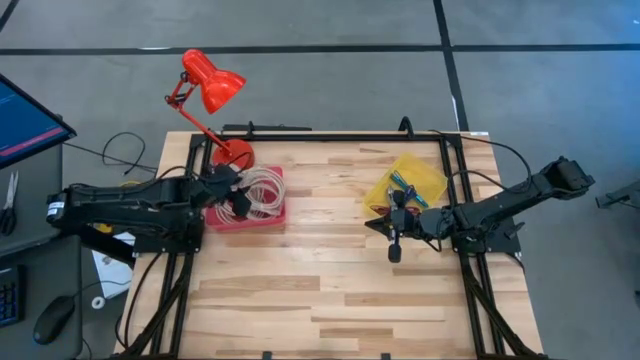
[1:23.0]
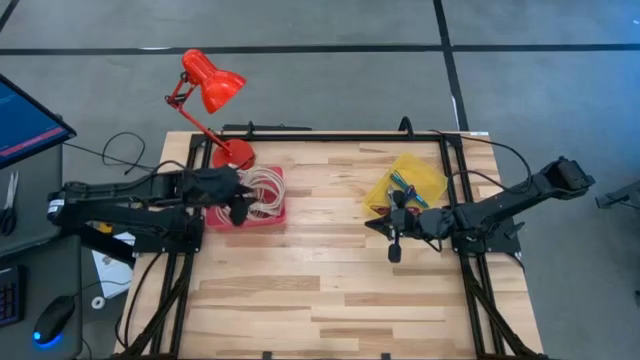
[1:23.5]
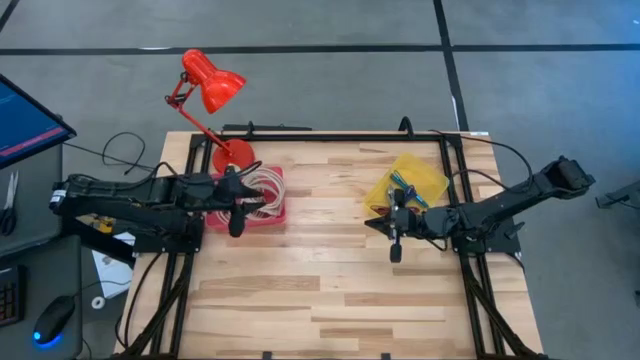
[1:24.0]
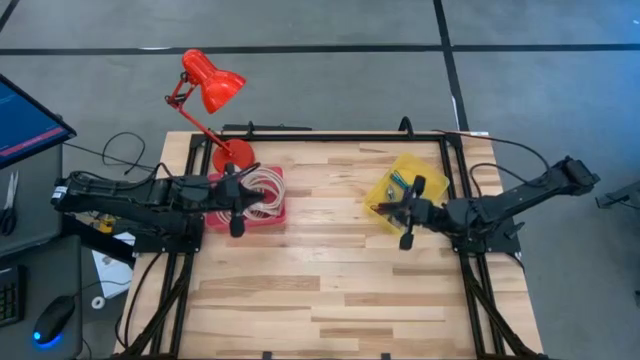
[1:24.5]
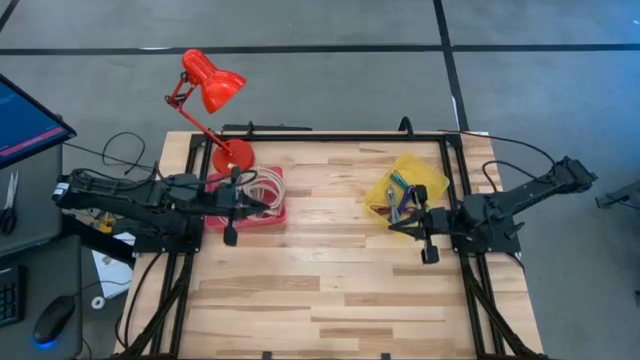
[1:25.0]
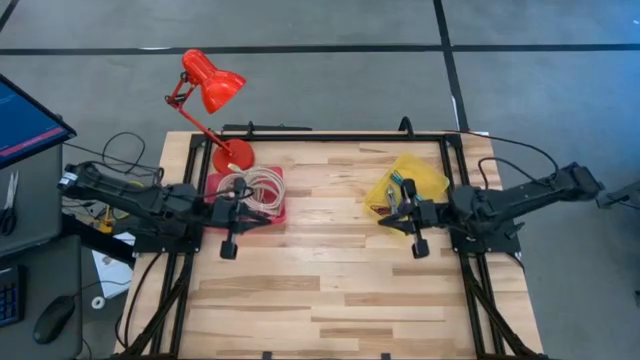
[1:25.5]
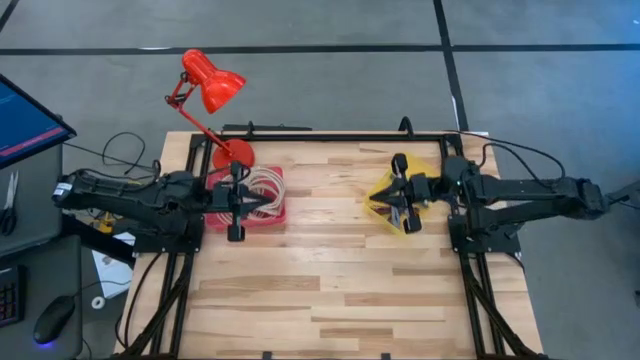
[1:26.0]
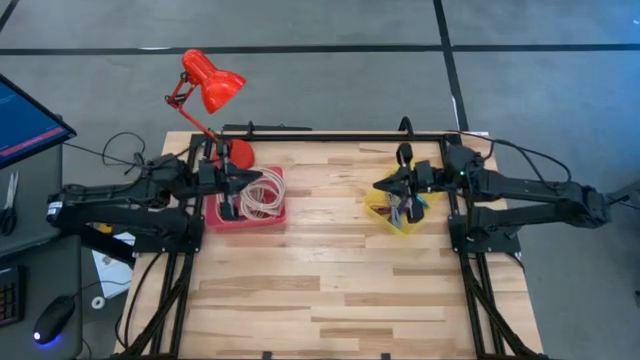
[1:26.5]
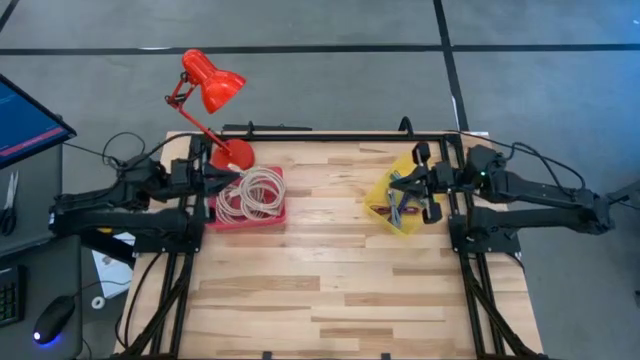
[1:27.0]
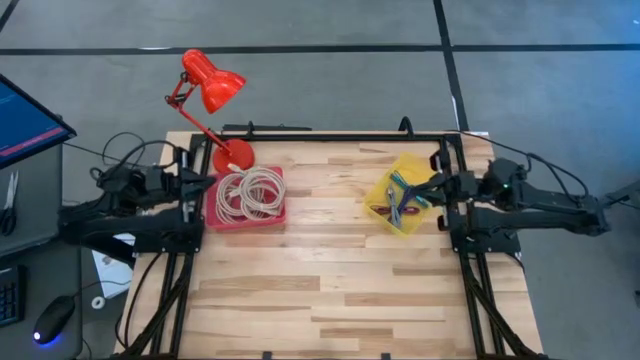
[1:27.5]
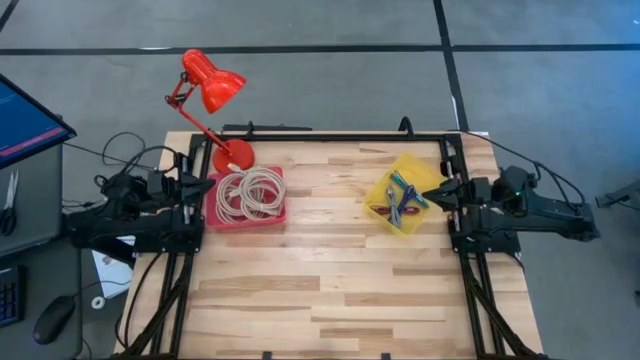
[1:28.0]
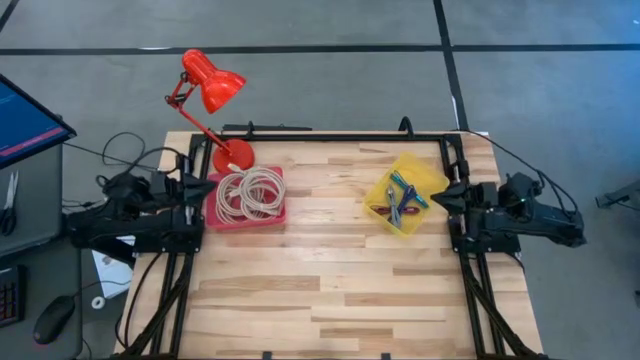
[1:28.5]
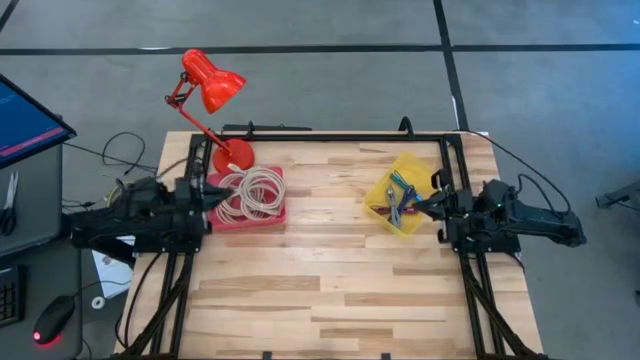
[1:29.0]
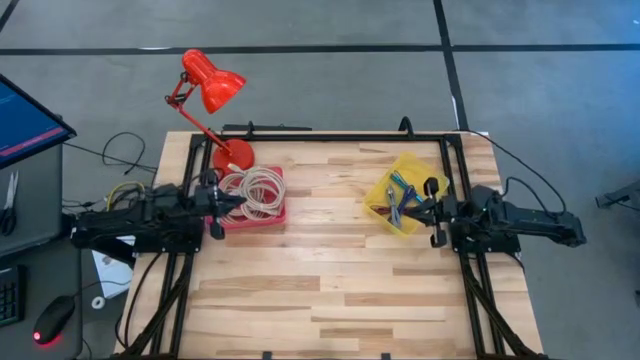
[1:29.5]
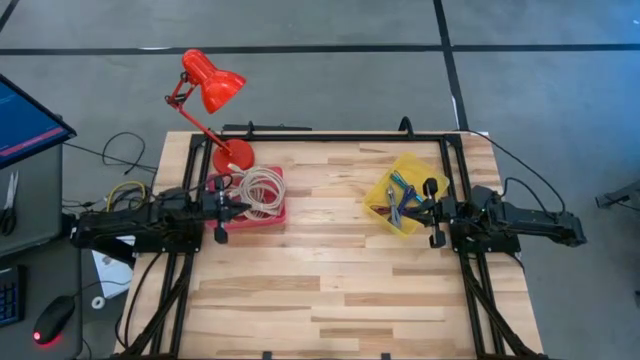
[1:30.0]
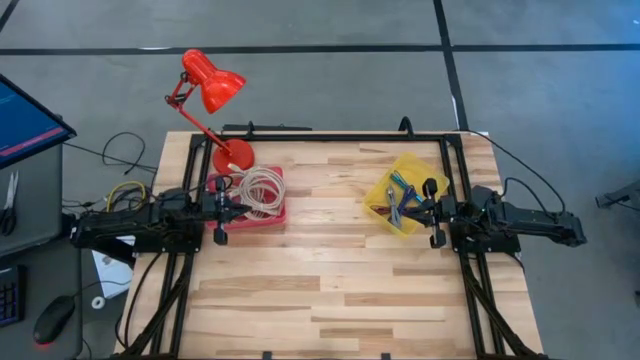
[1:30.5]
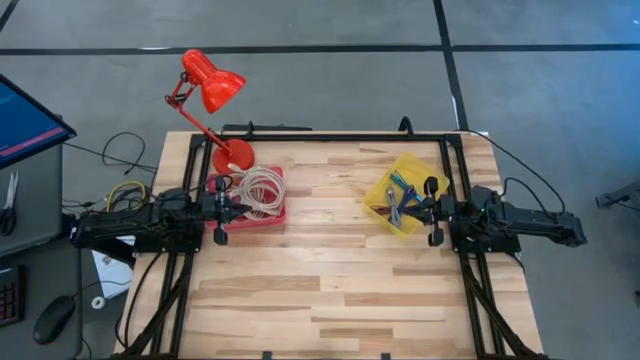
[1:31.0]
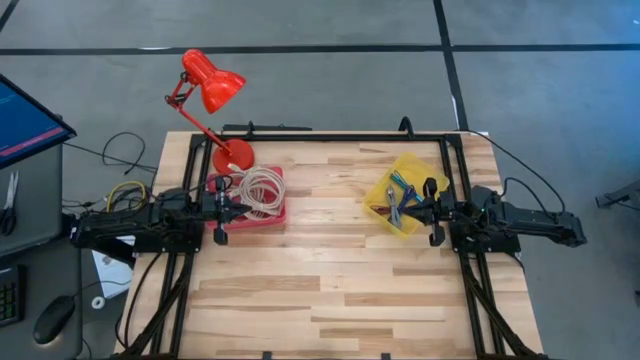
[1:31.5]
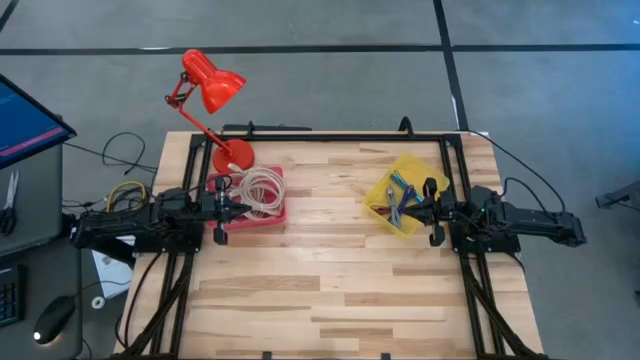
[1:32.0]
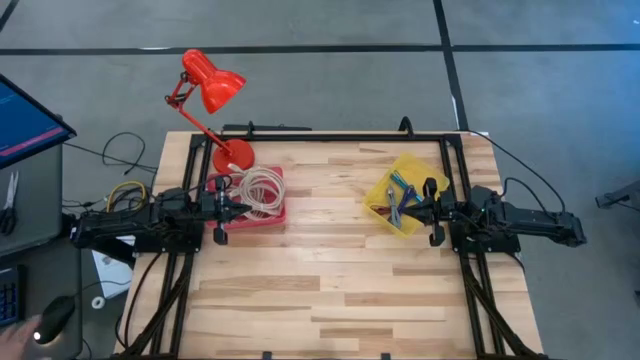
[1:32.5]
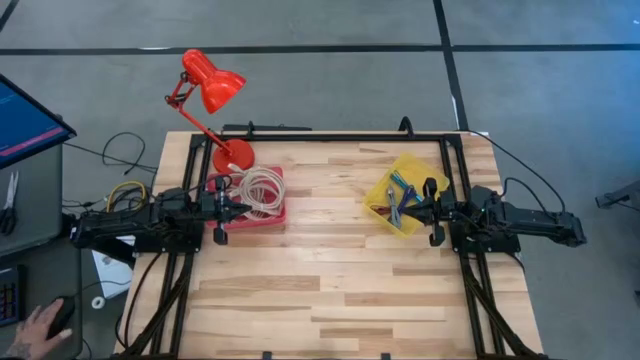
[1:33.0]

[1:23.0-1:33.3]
Task: Pick & Place USB Port
Return to Home Position

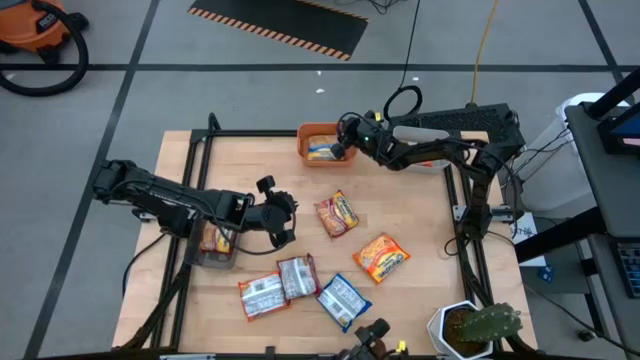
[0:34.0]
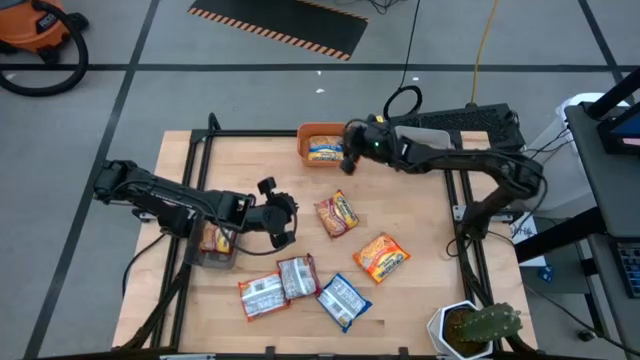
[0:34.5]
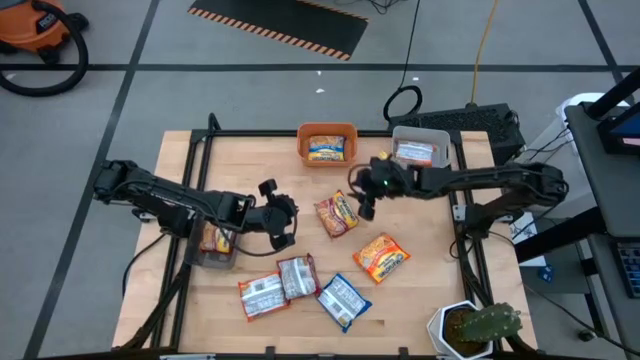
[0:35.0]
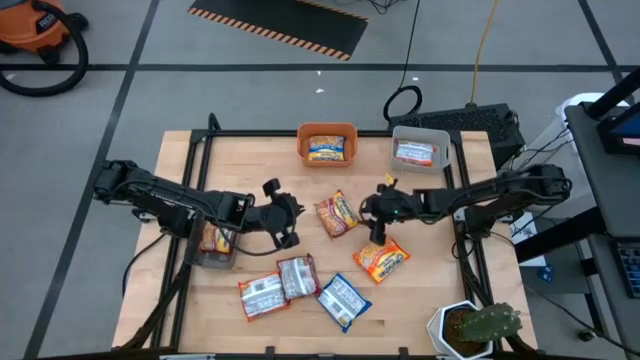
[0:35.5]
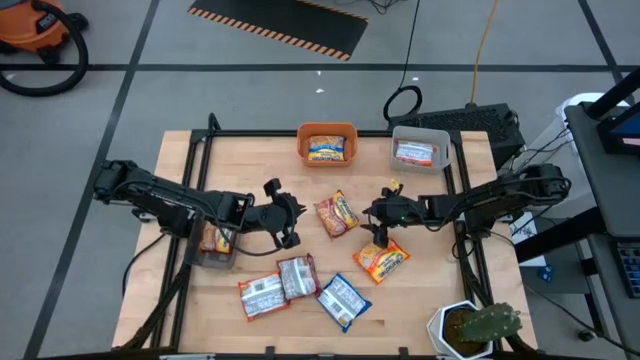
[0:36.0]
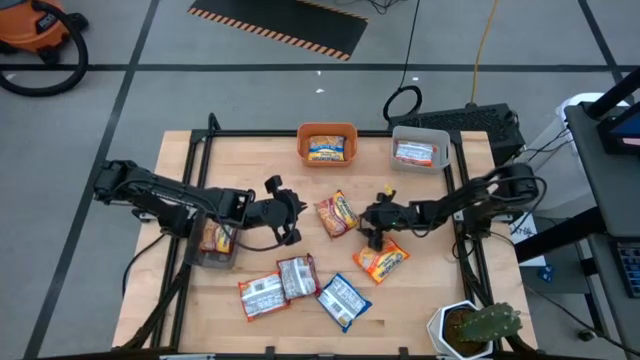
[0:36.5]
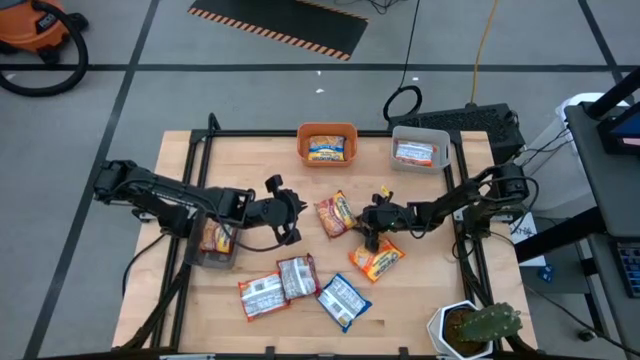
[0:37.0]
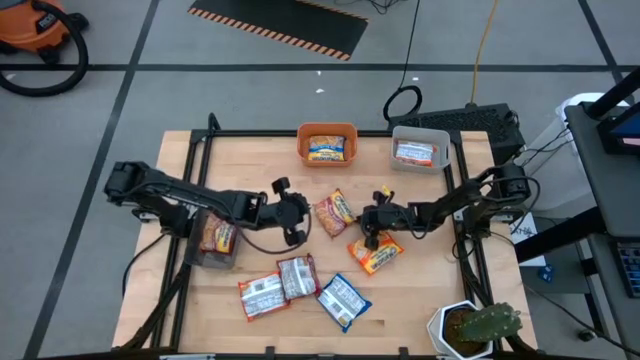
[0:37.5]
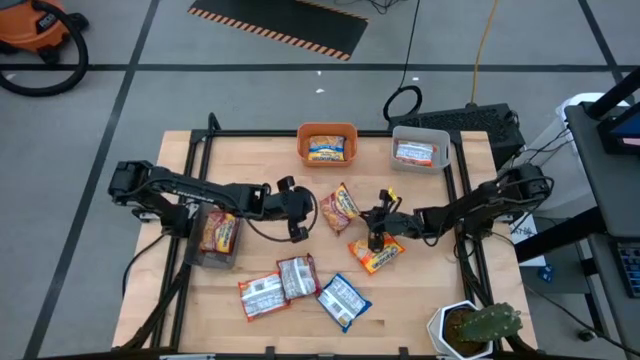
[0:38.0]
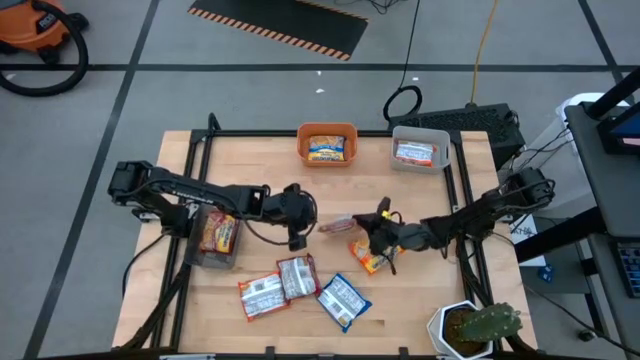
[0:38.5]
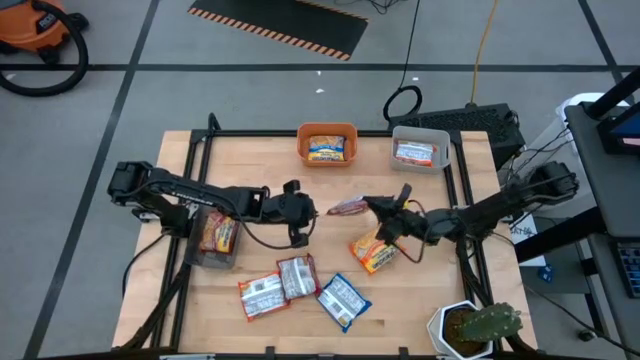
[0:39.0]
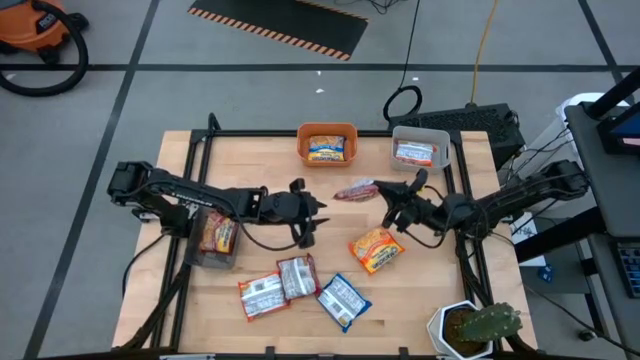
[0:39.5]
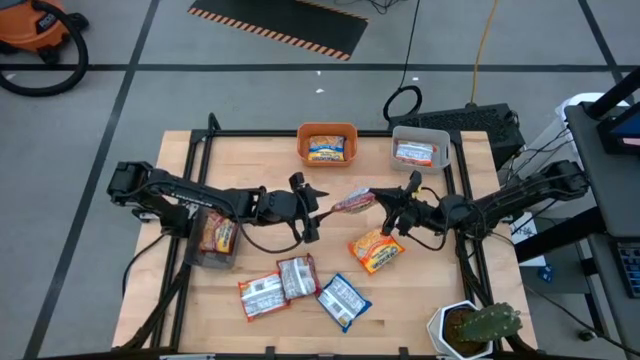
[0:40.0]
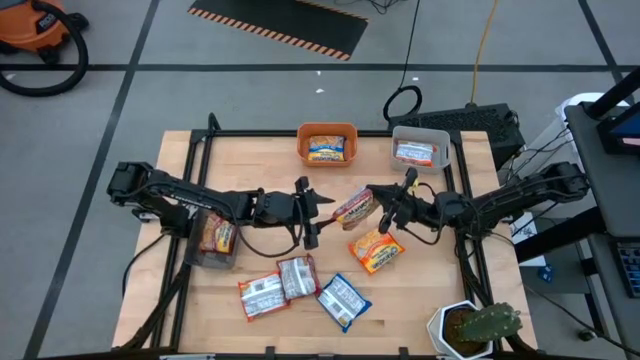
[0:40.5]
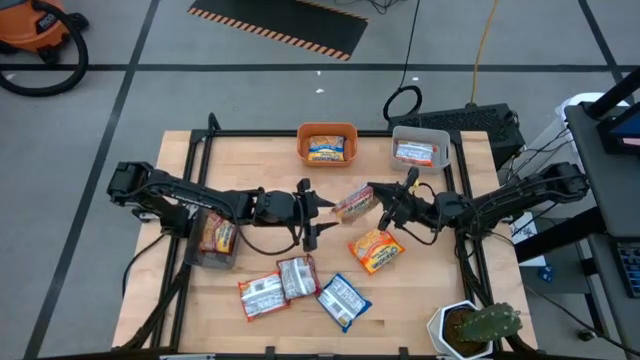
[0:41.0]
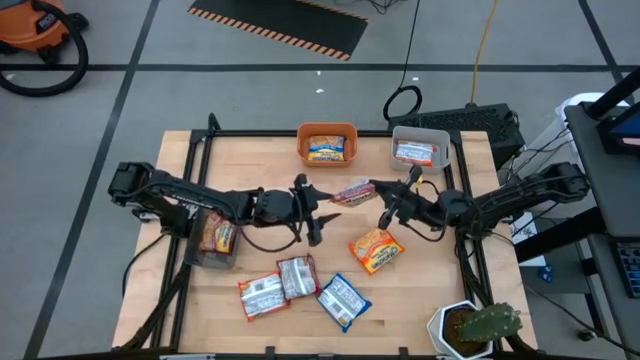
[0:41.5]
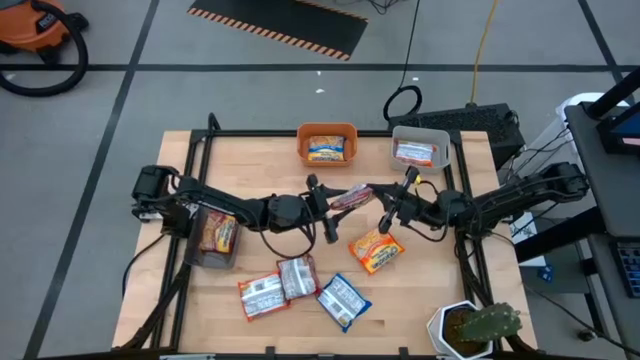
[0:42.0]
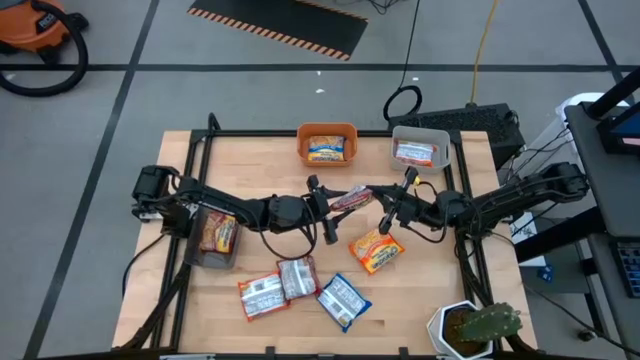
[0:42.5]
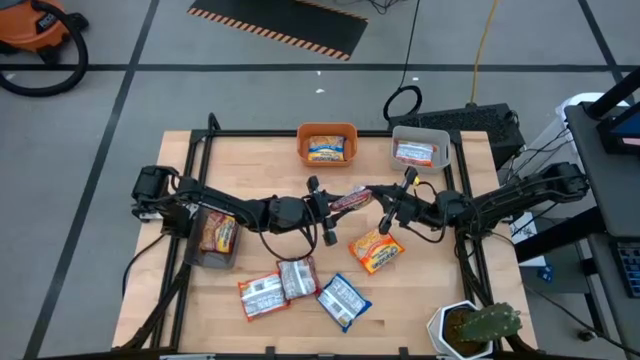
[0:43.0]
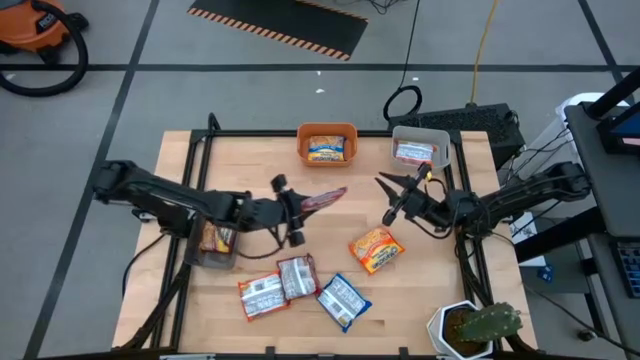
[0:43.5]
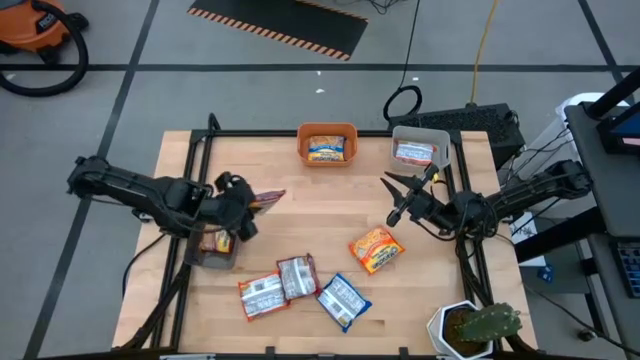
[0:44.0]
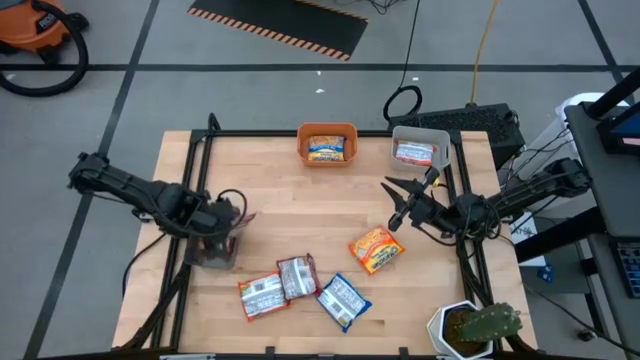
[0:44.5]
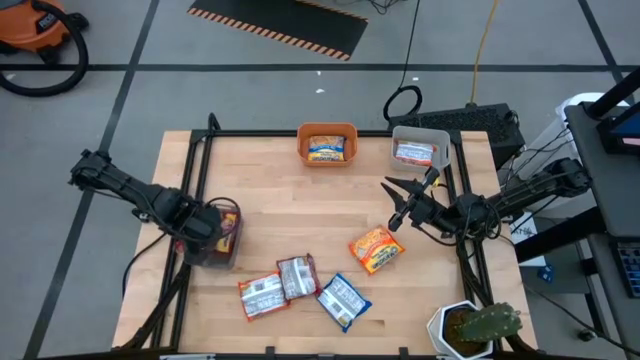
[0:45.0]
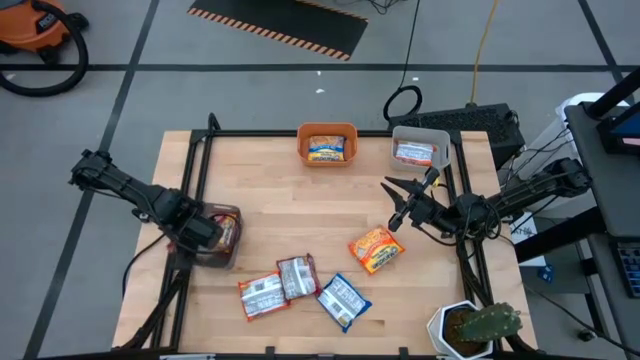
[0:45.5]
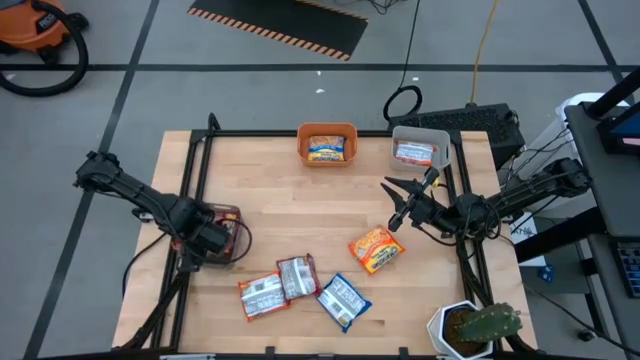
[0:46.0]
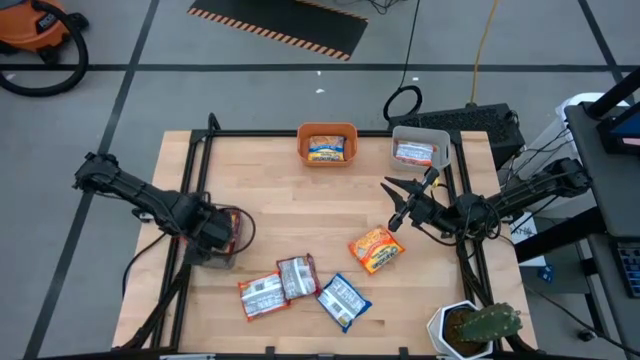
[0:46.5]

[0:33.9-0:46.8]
Task: Sort Maruchan noodles
Put the top red noodle pack into the black bin
